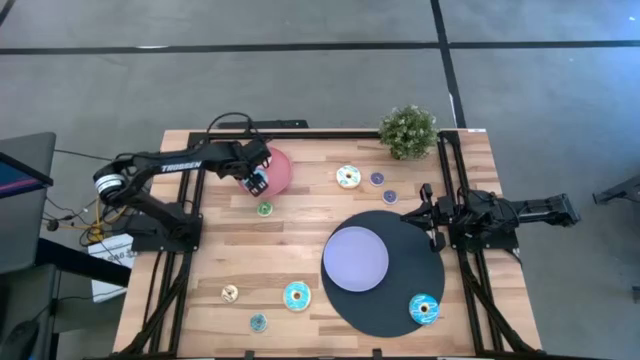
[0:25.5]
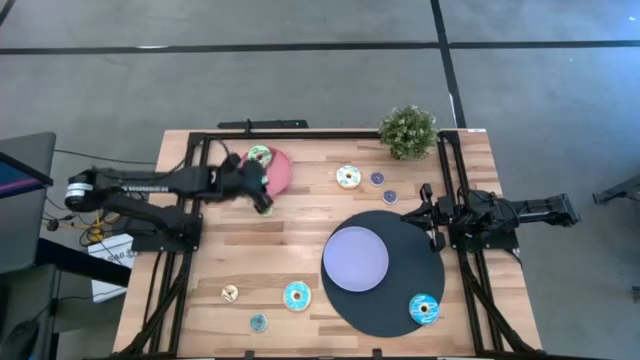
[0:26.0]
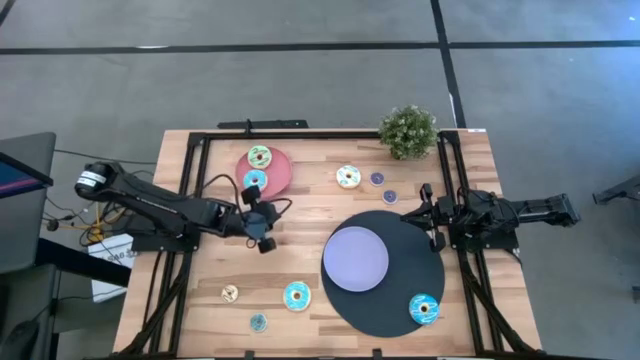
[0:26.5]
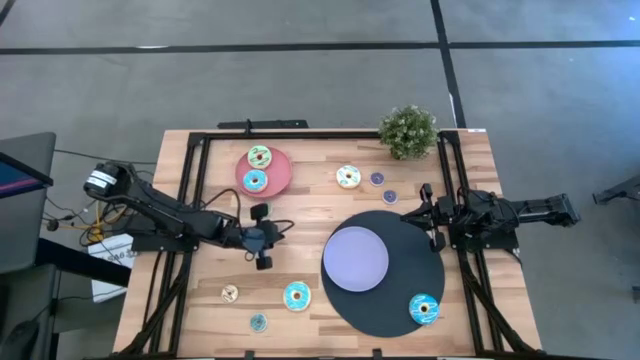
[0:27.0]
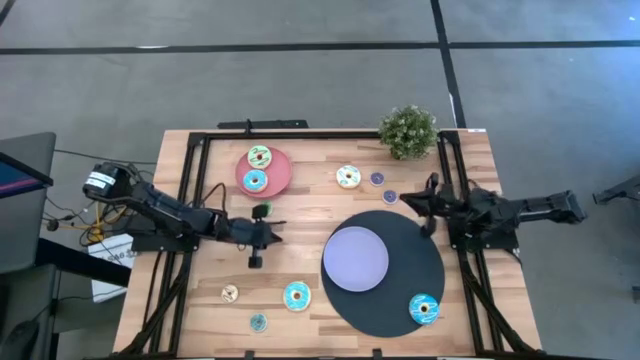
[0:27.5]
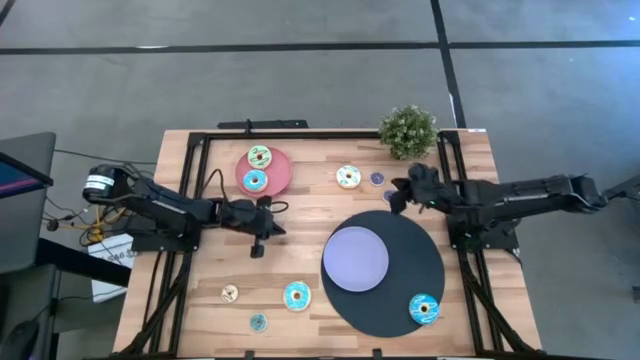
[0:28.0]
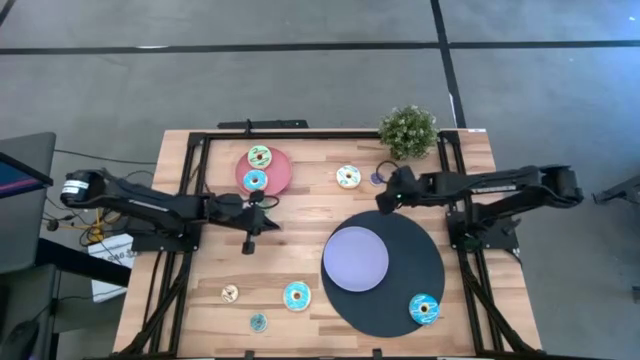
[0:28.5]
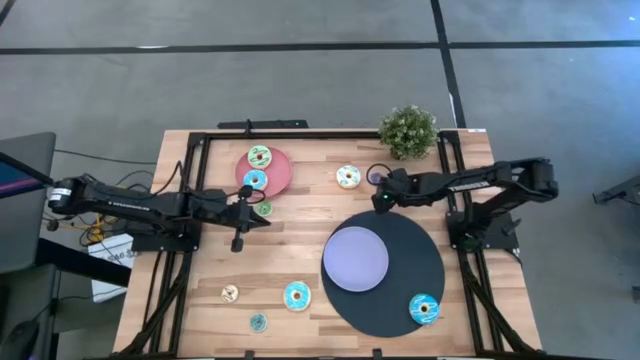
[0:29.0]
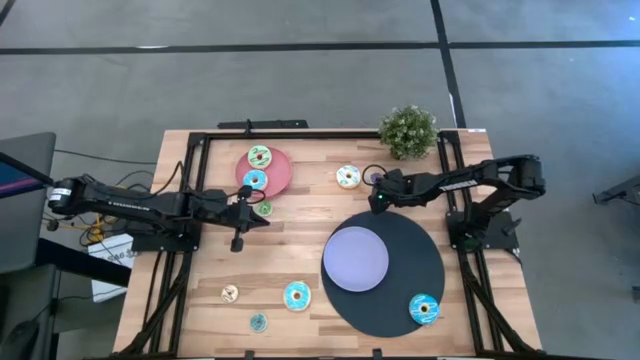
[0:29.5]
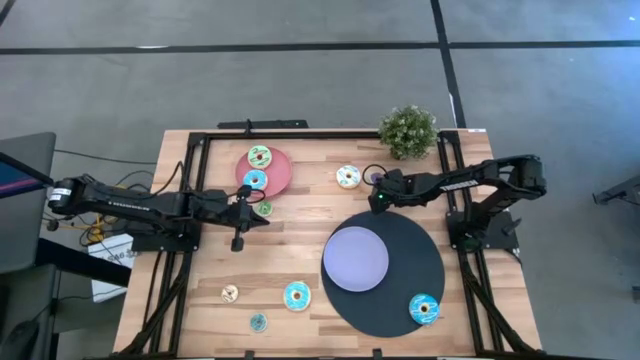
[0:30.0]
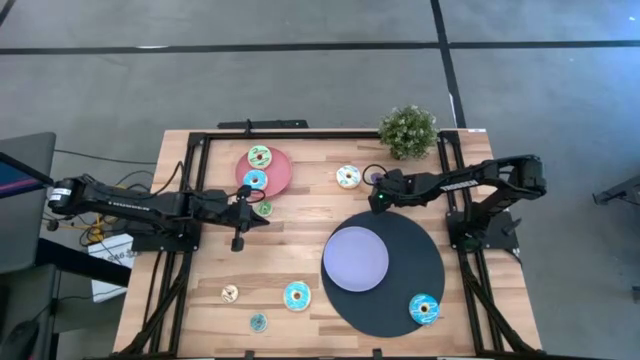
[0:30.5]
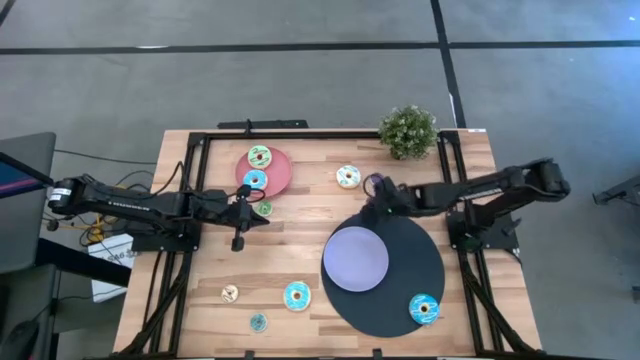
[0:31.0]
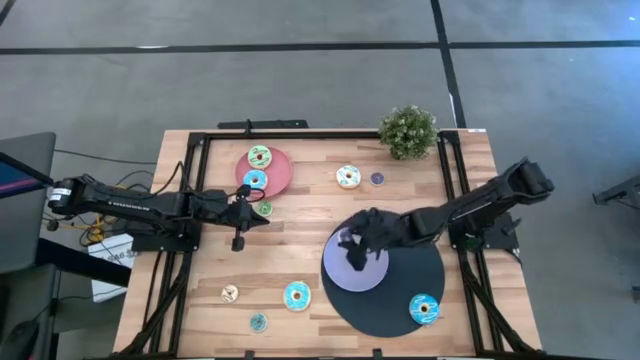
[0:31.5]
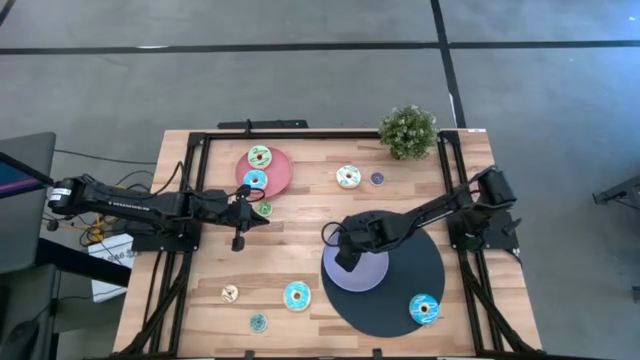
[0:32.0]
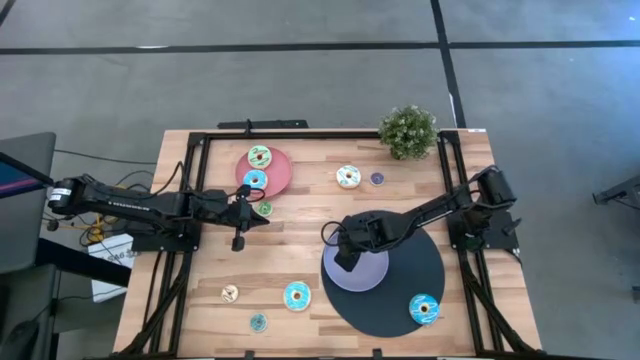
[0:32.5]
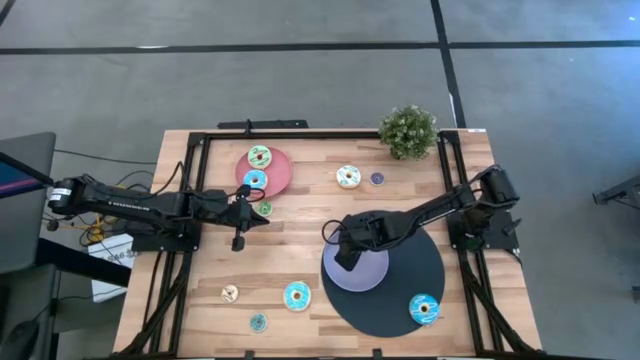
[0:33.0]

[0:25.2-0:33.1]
Task: Pick & Place donuts
Put the small violet donut on the purple plate

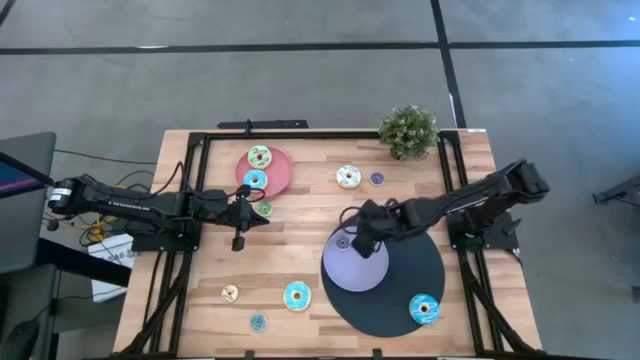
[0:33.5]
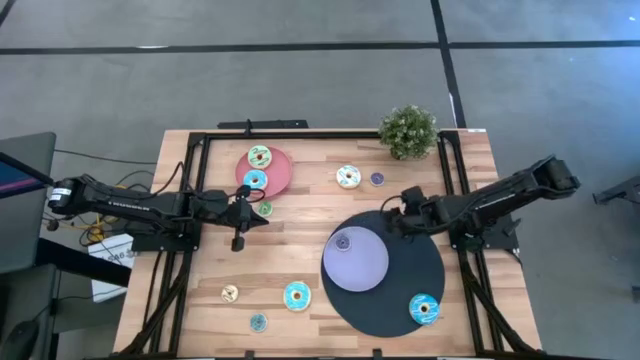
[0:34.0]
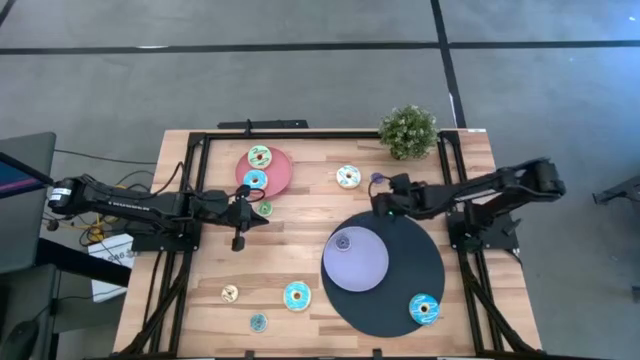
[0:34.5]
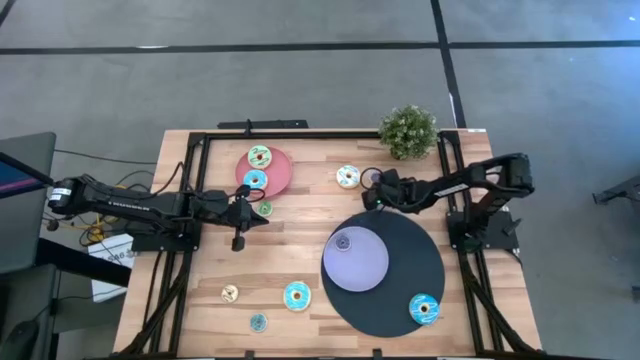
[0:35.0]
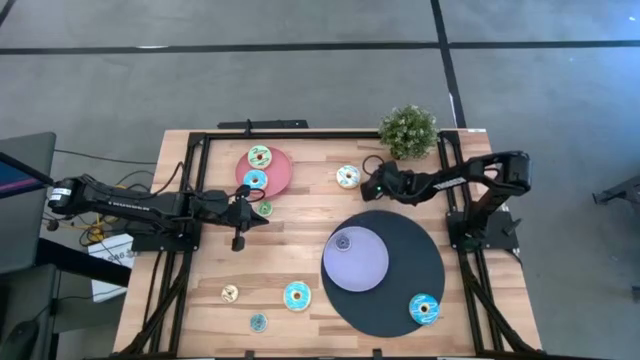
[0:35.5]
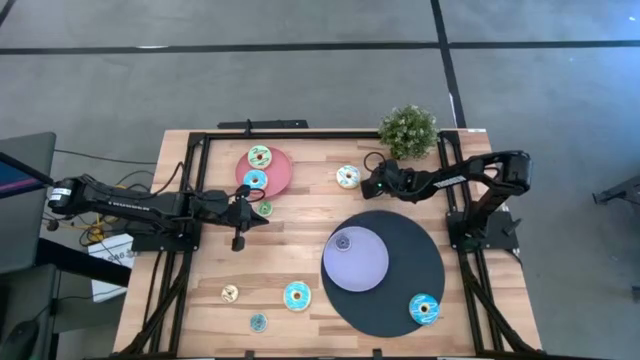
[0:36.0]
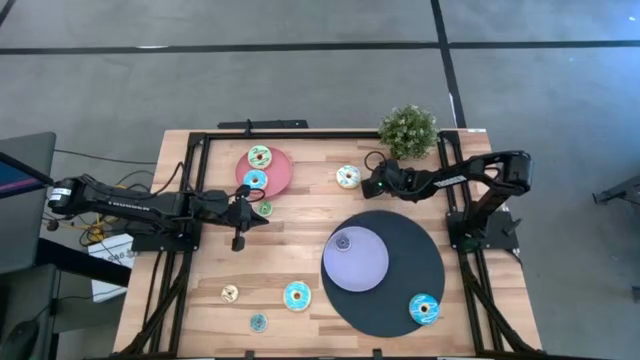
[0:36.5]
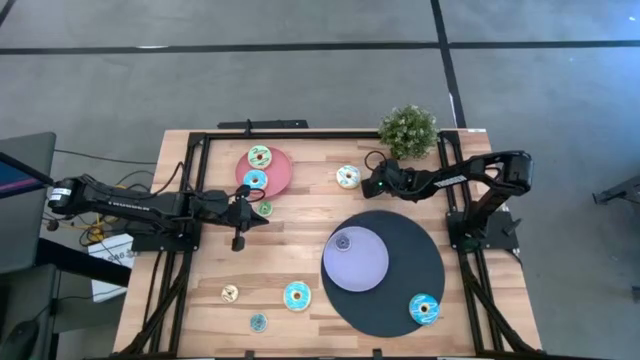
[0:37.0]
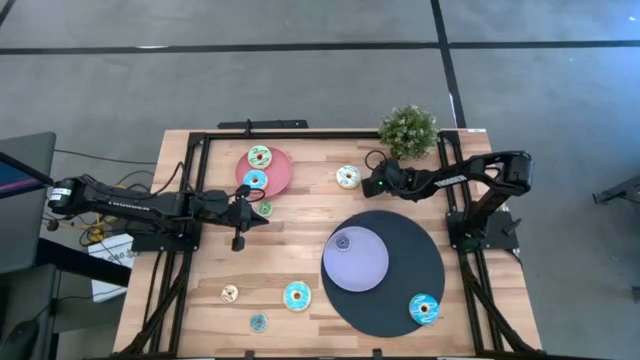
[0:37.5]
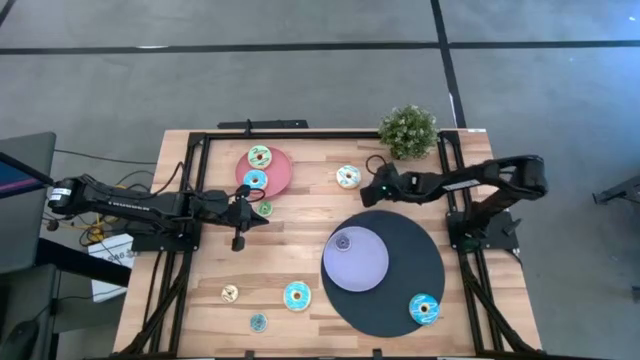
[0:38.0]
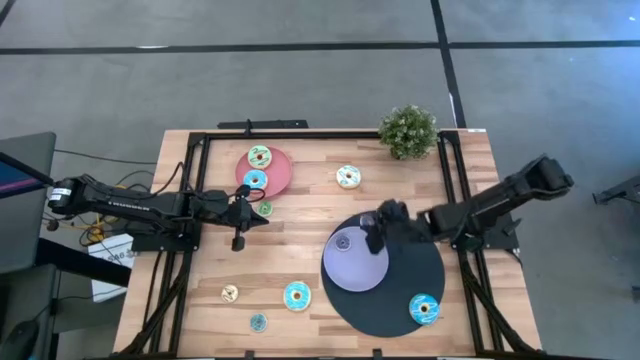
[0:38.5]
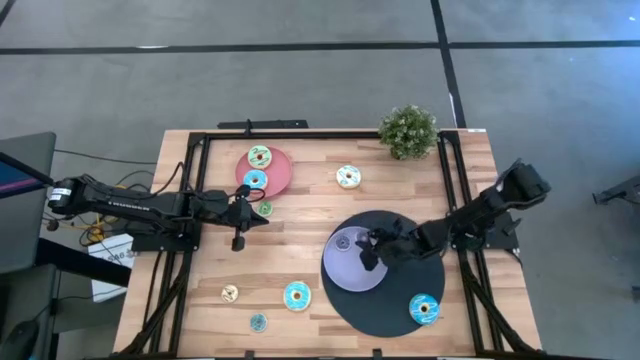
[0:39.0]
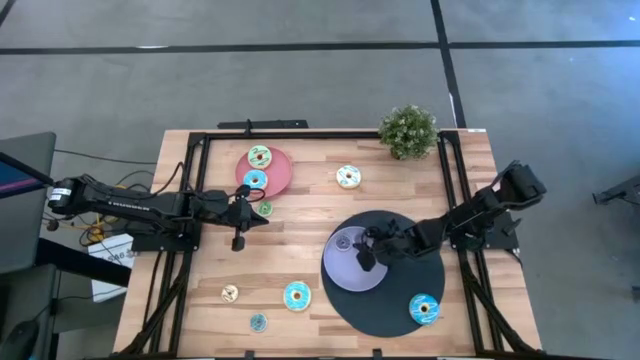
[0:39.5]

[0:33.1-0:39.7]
Put the small violet donut on the purple plate

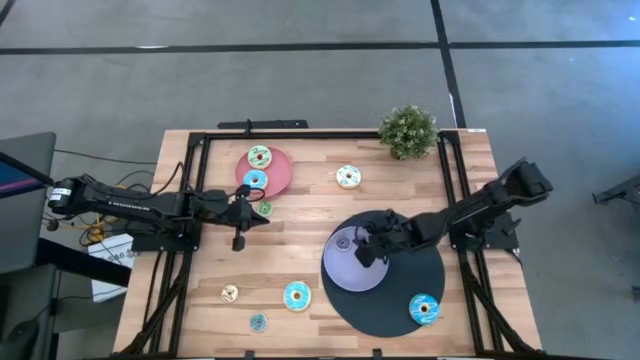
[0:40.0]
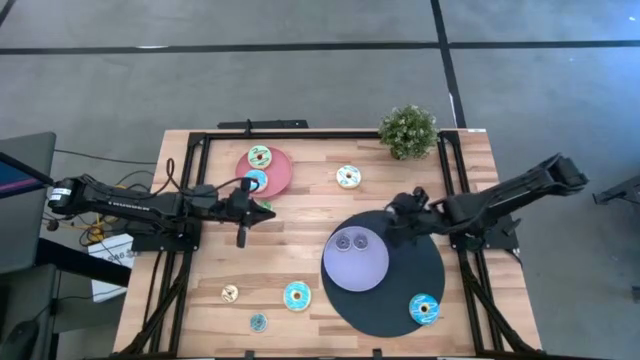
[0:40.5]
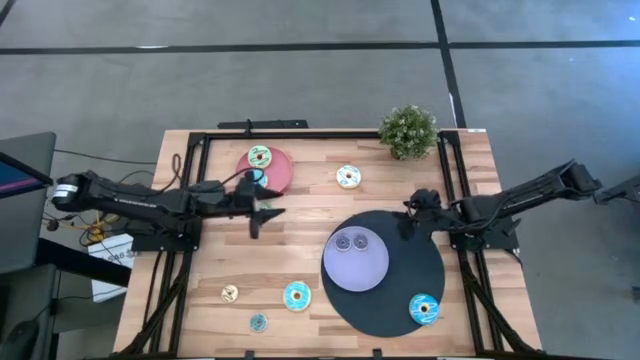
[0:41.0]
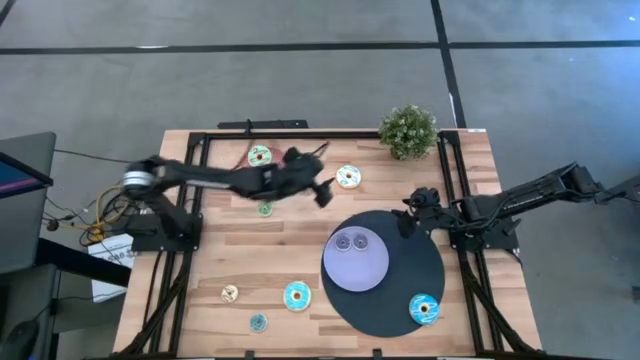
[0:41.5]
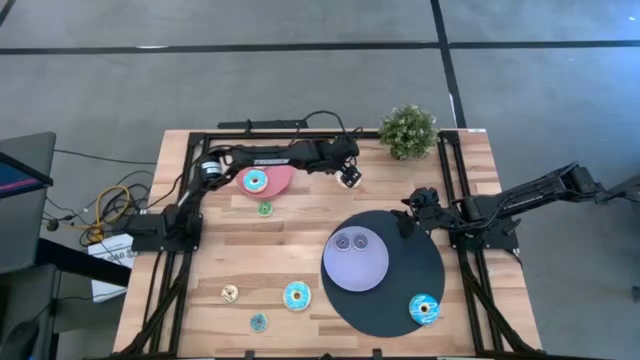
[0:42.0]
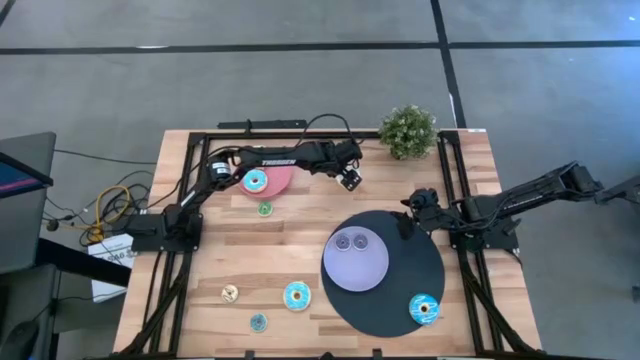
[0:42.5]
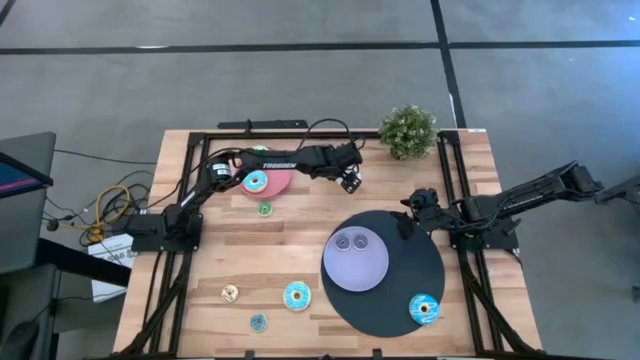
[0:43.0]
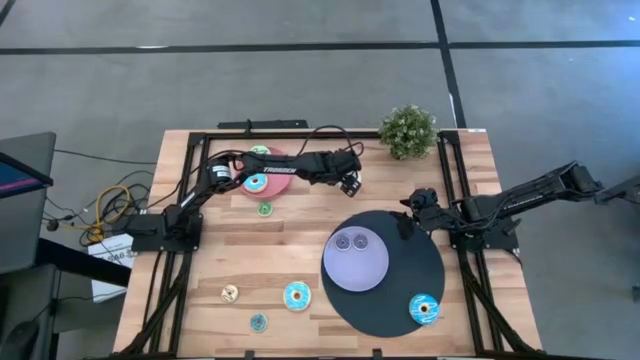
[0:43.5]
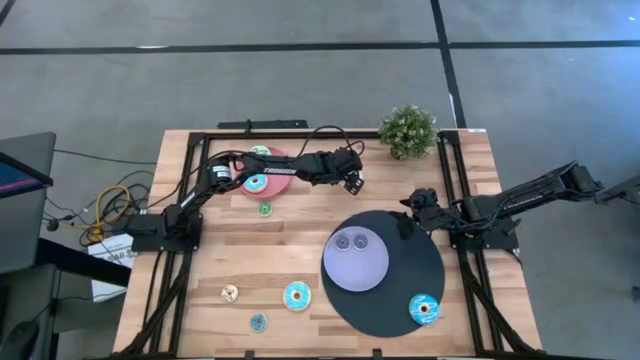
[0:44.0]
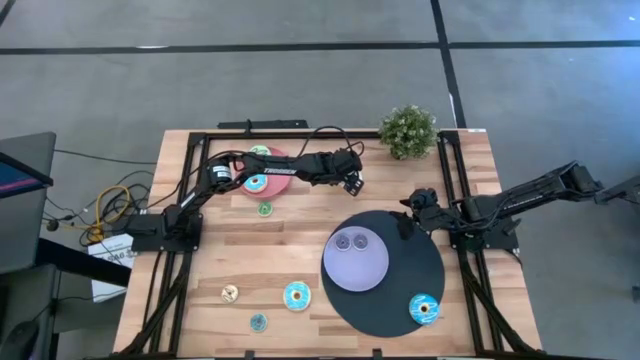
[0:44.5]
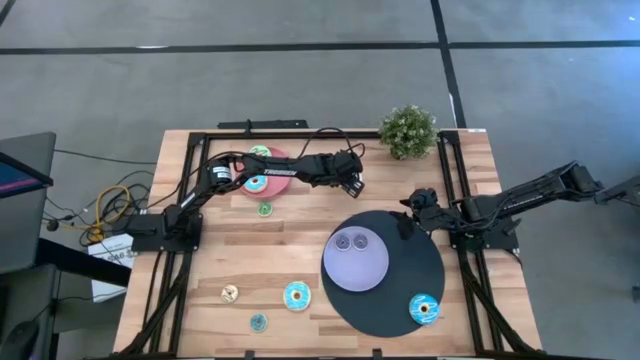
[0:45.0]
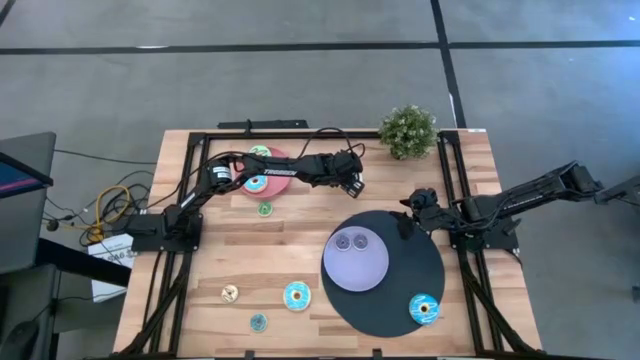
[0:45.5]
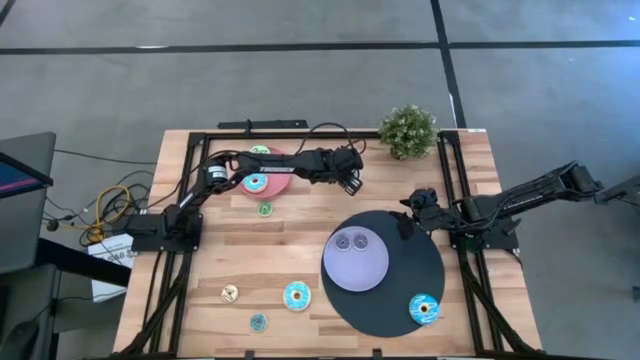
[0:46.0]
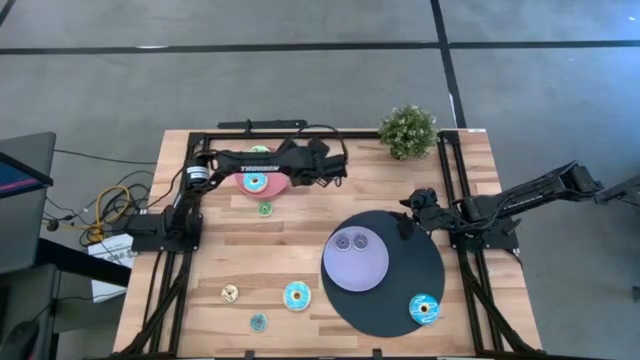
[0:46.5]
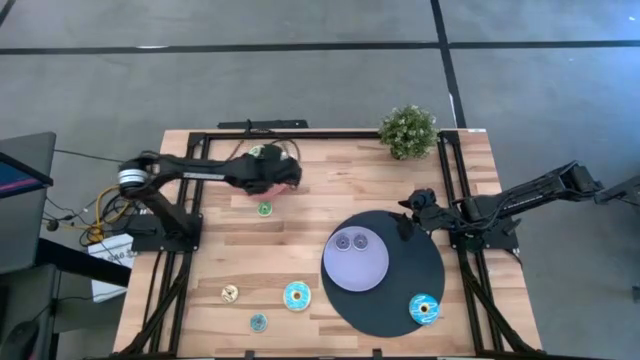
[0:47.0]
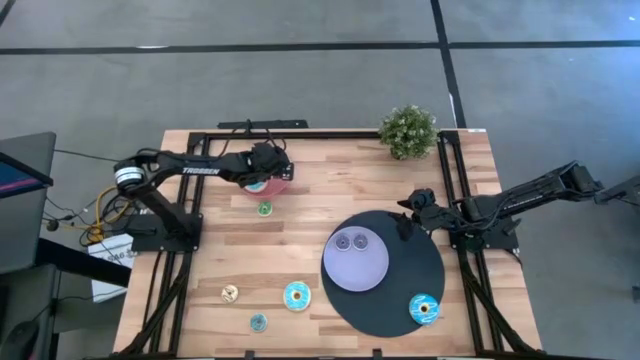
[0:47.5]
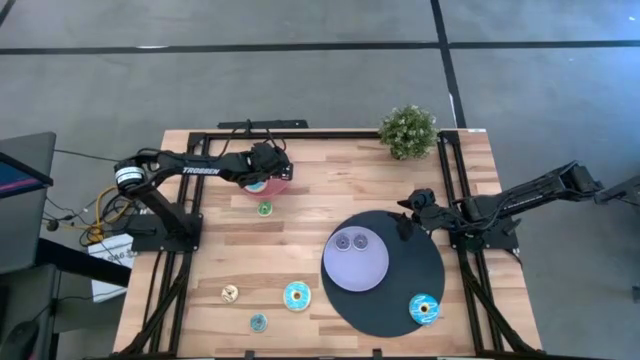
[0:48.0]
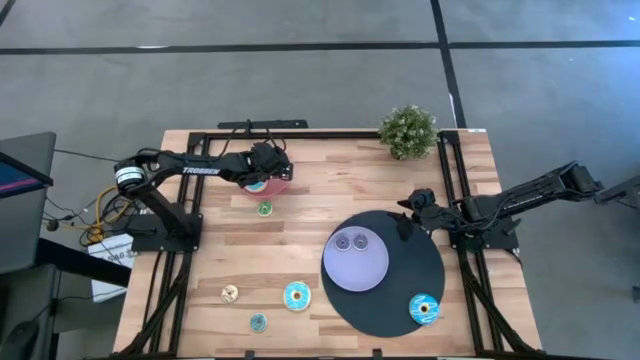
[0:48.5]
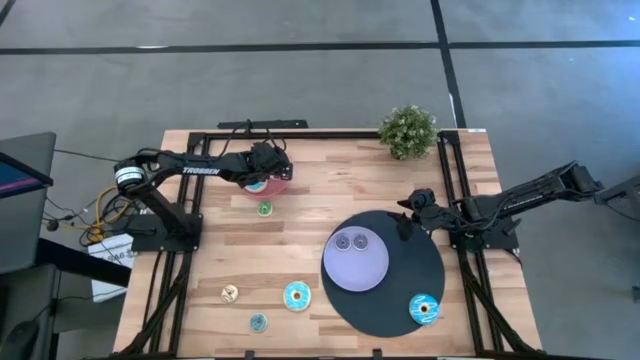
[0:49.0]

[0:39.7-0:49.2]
Put the big white donut on the pink plate
